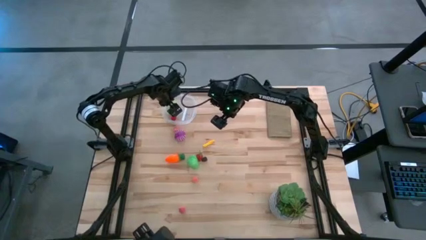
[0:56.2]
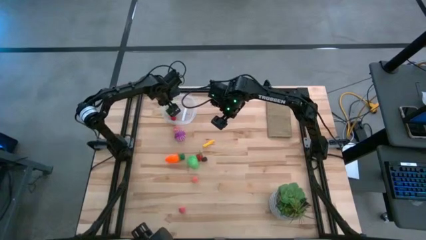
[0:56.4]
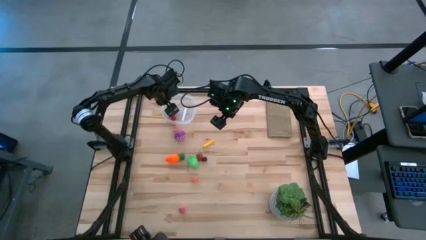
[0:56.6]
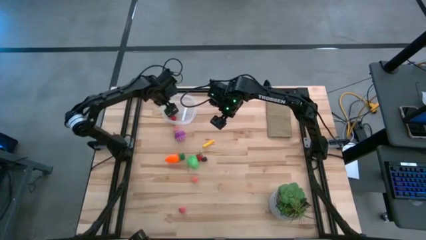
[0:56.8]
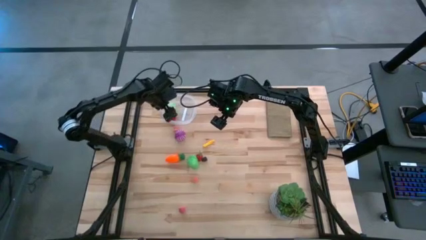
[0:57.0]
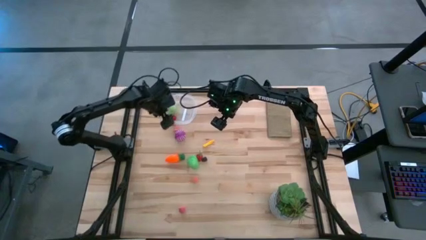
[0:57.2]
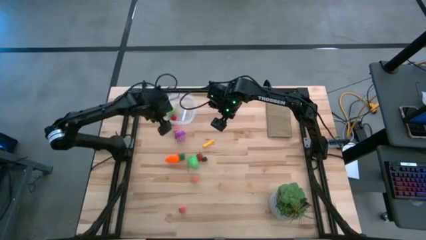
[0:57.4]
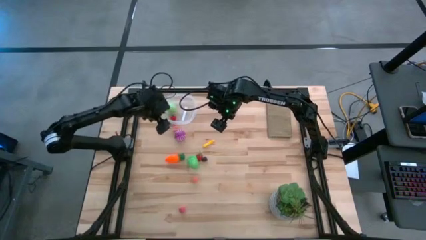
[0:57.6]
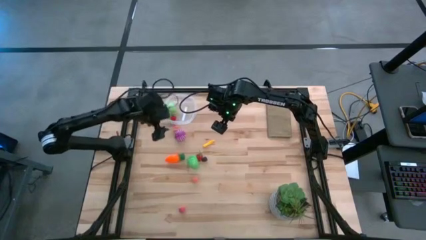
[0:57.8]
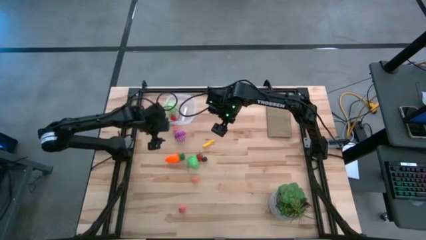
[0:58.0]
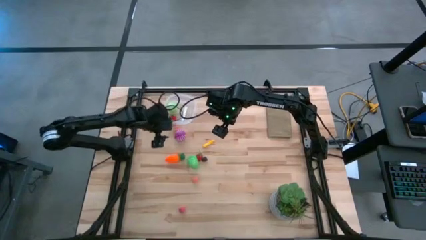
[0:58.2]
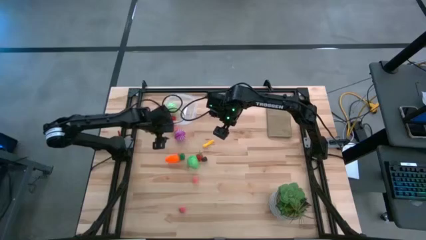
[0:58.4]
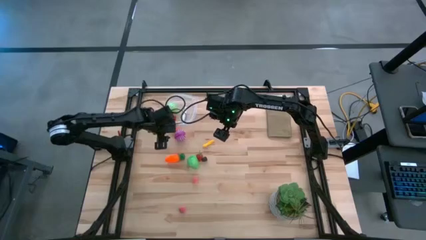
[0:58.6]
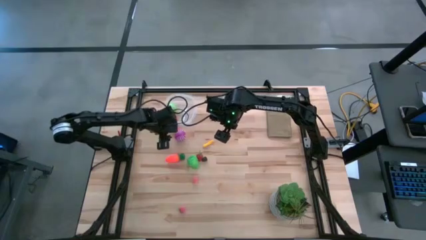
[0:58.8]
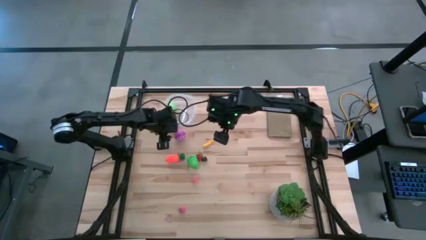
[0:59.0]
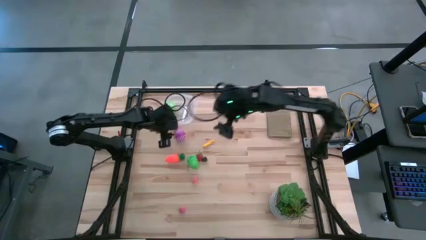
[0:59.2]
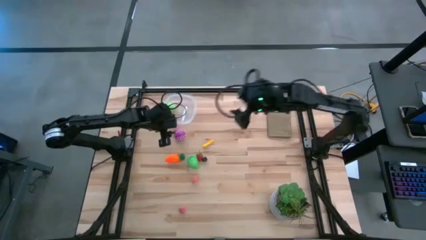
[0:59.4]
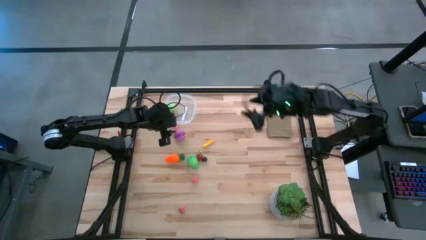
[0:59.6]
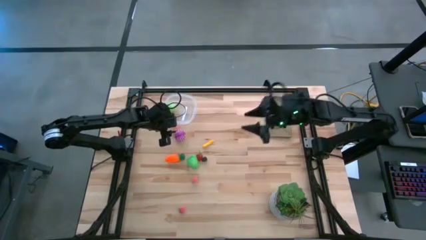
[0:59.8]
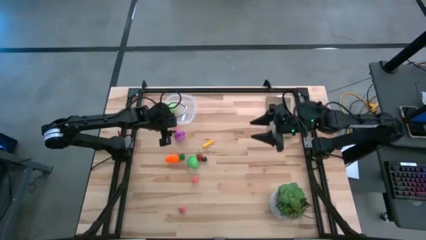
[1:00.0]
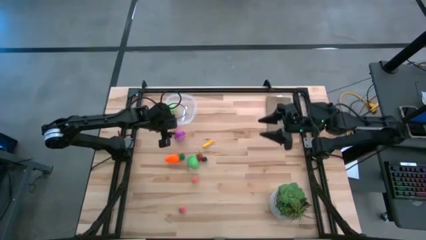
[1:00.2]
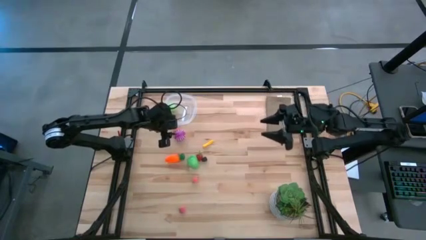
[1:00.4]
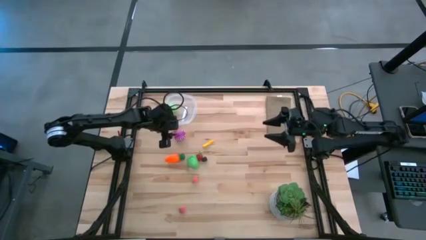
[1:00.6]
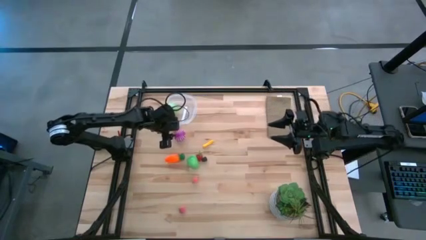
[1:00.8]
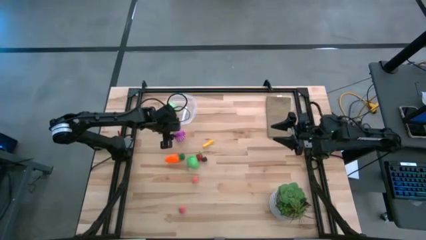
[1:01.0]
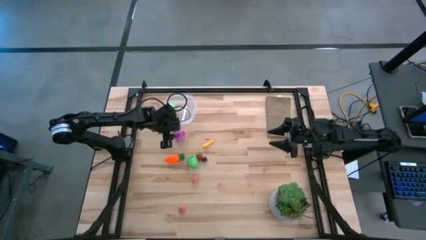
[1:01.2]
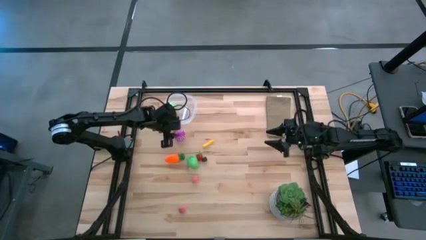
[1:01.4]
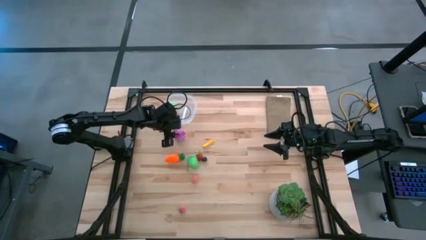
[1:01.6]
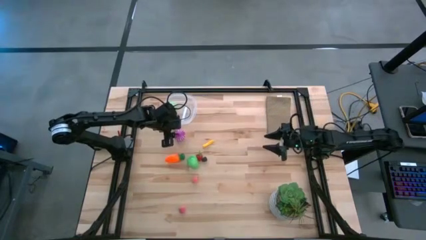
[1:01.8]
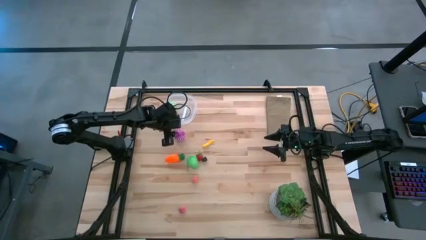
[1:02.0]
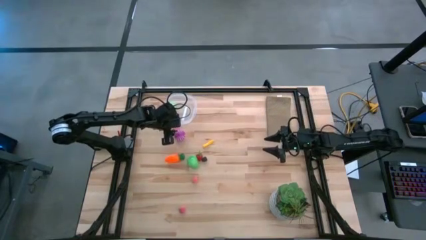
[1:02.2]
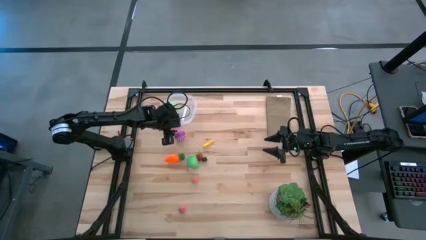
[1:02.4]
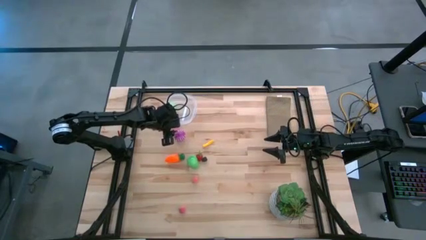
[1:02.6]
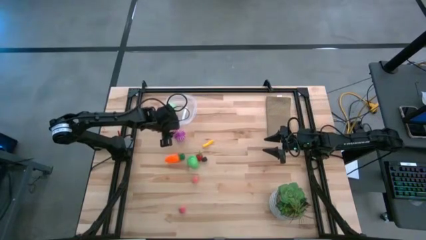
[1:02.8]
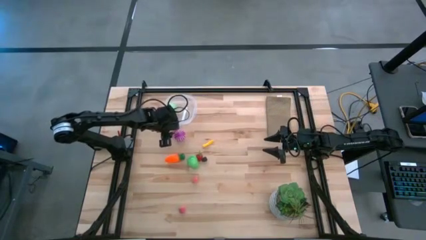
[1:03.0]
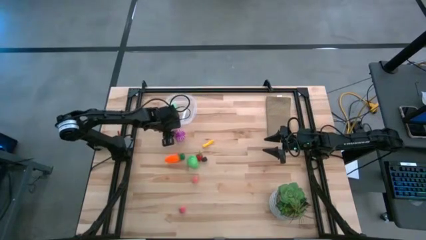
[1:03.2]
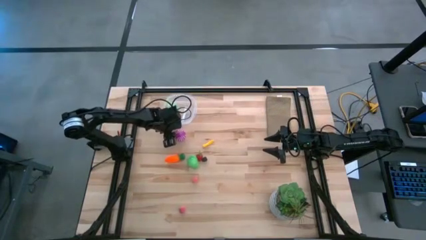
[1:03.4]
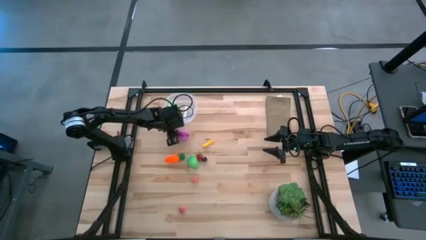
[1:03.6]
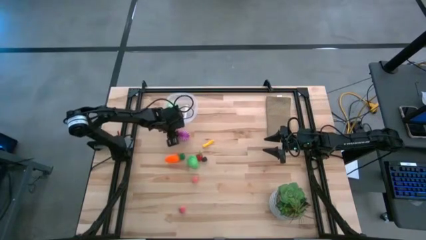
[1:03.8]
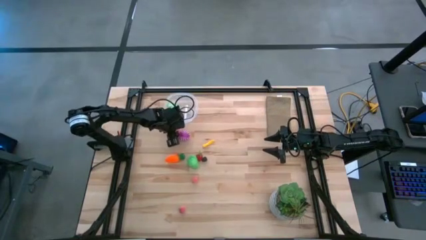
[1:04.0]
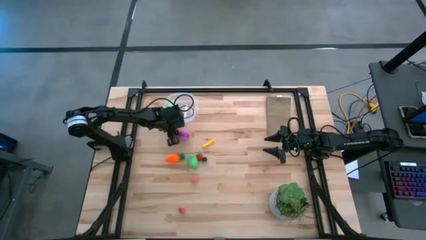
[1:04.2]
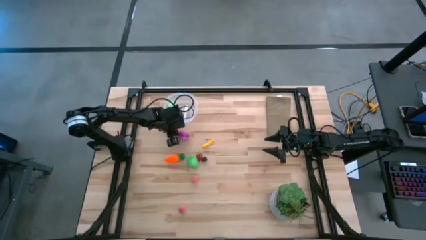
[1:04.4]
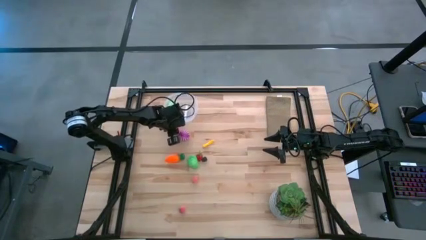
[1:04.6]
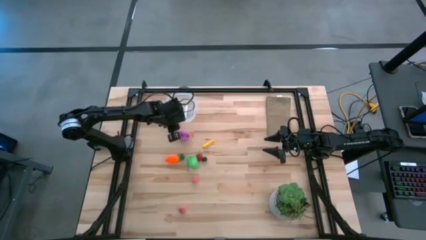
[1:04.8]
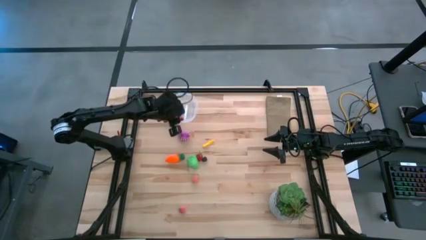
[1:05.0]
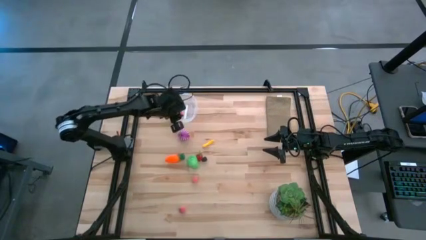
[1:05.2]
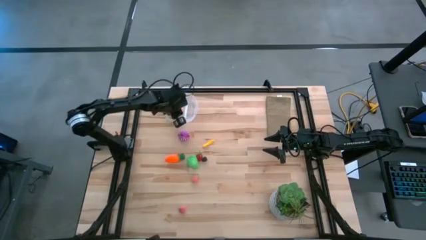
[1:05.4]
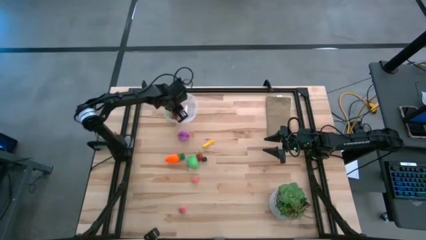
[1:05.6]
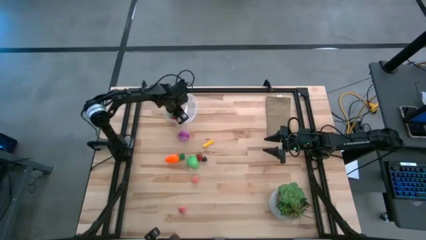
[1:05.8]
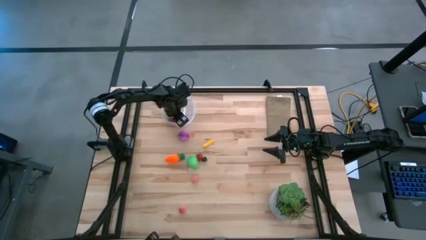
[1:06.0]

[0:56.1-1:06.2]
Task: Pick and placing Produce into tupperware
Put the top peach into the transparent bin
